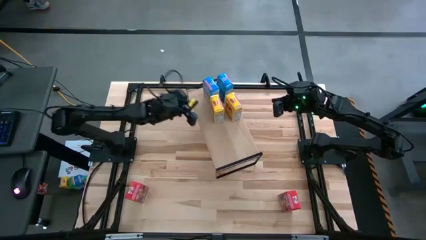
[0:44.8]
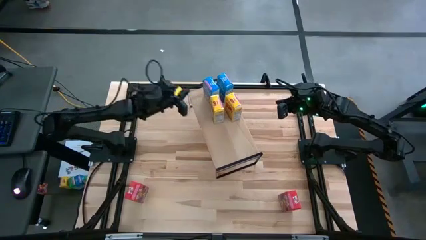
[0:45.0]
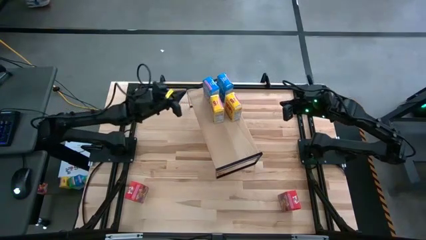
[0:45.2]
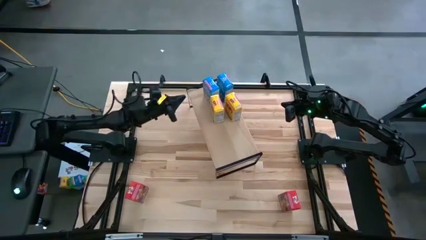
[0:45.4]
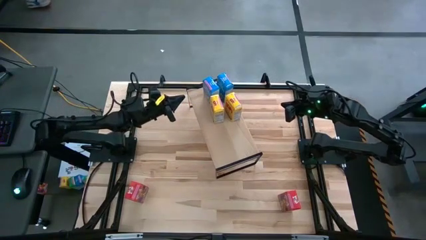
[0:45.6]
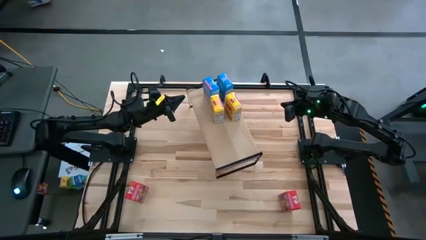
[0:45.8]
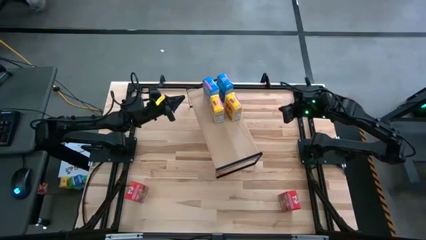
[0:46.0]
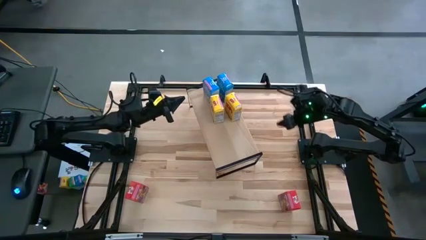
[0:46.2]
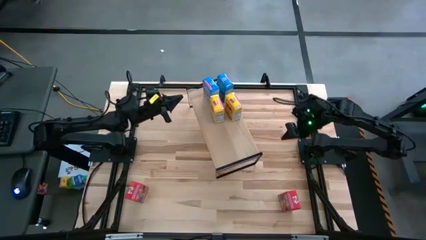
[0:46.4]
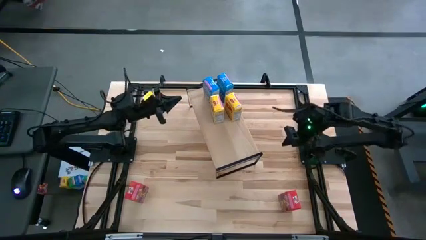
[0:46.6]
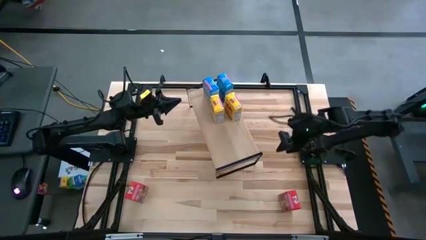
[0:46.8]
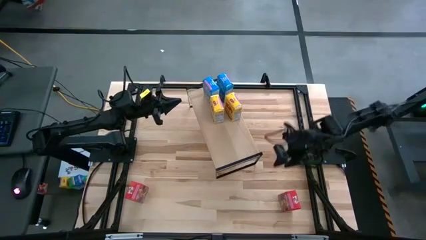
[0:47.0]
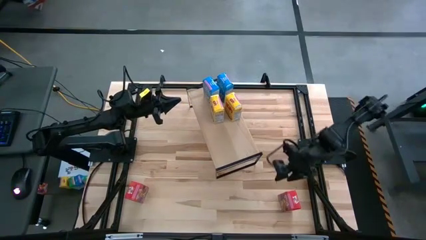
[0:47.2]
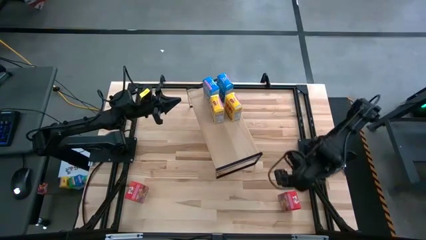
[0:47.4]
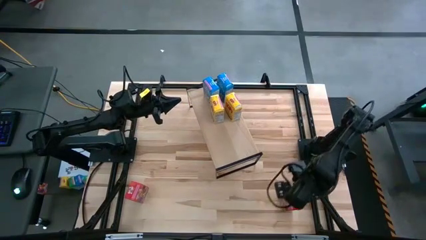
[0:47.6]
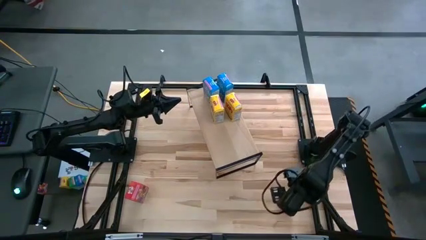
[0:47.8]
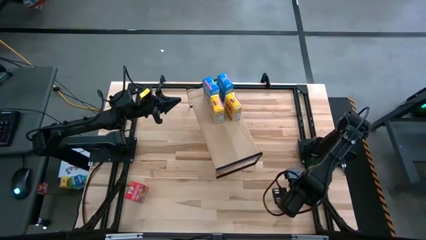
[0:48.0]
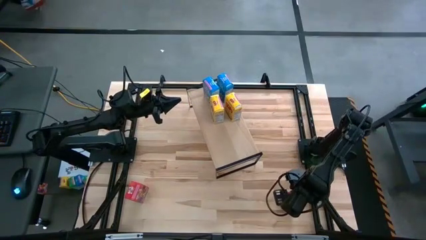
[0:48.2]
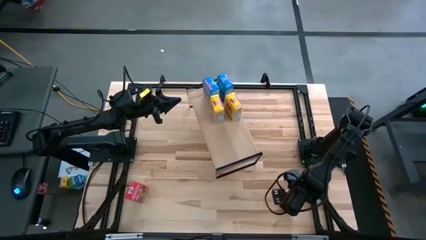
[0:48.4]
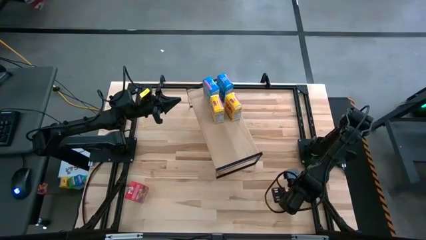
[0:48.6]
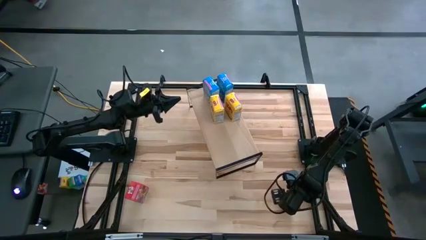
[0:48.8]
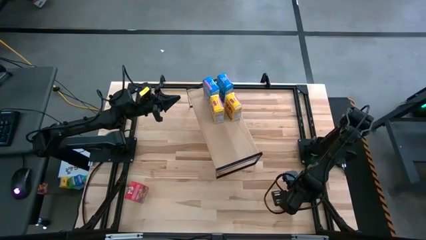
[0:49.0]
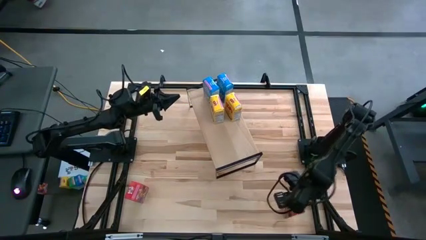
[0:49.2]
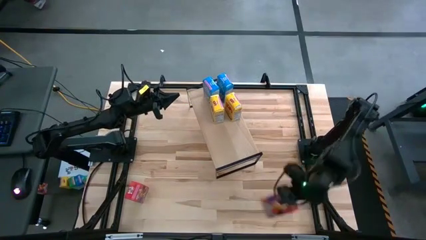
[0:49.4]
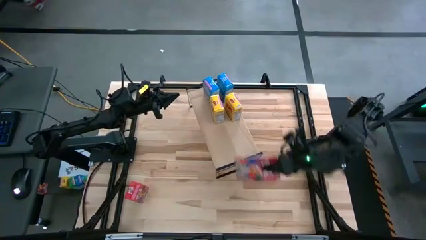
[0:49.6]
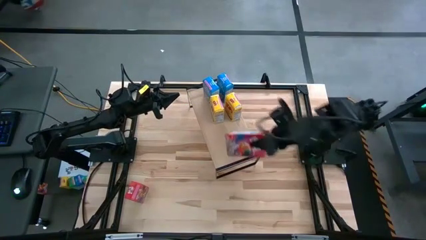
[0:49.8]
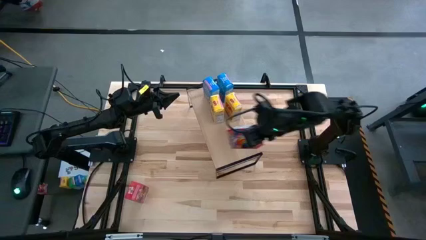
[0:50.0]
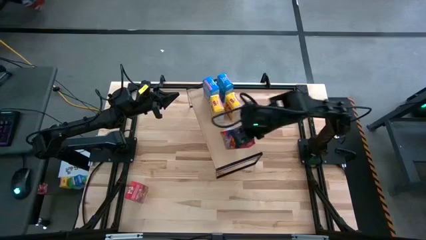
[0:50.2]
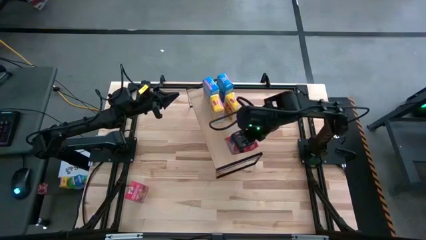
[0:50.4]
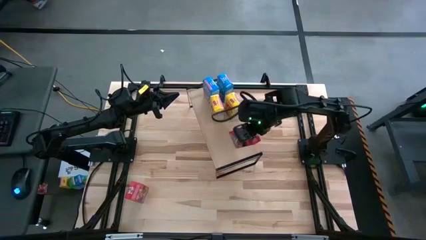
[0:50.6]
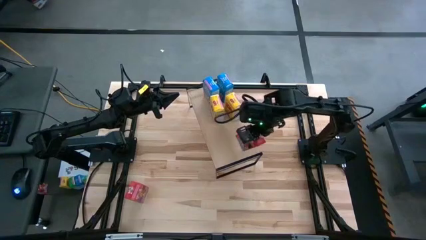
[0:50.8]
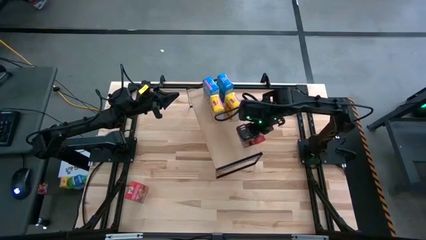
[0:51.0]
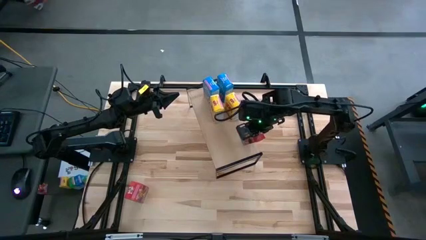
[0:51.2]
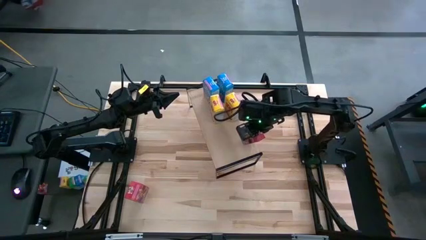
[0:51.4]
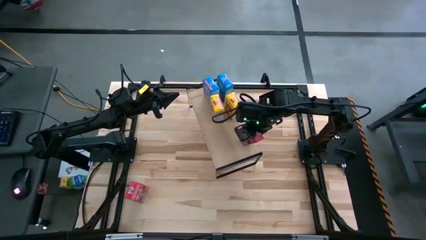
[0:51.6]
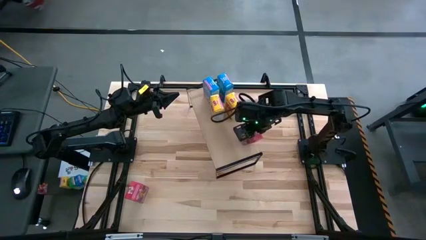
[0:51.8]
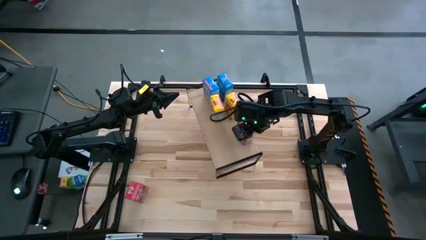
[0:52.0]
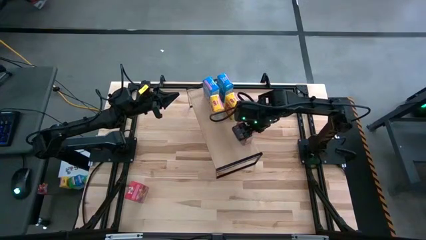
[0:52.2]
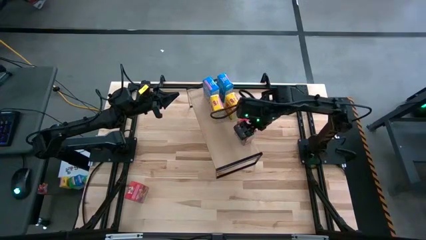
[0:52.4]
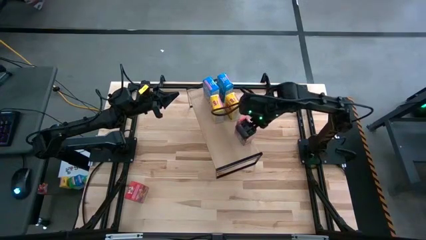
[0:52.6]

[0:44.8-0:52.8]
Task: Stack cereal on shelf
Put the right red cereal box on the shelf

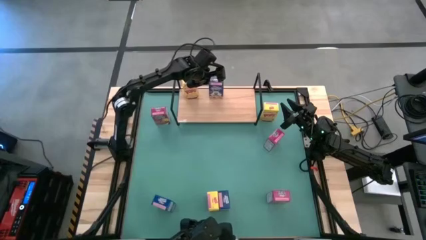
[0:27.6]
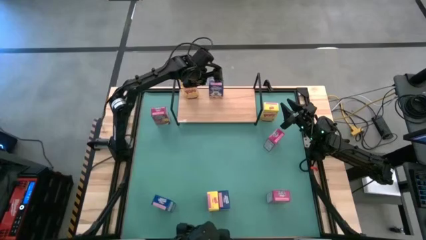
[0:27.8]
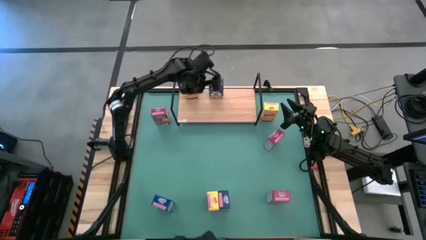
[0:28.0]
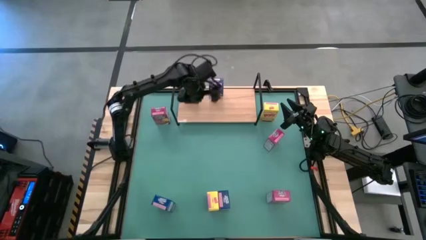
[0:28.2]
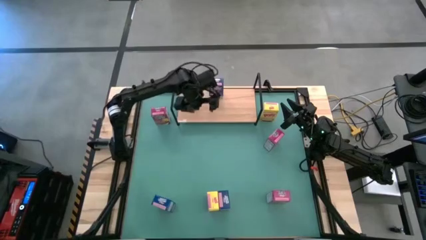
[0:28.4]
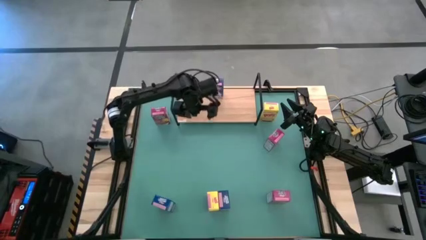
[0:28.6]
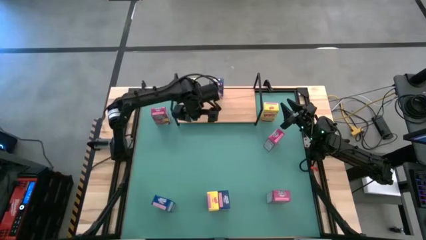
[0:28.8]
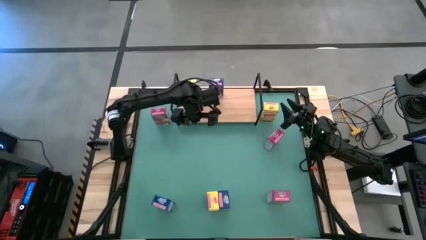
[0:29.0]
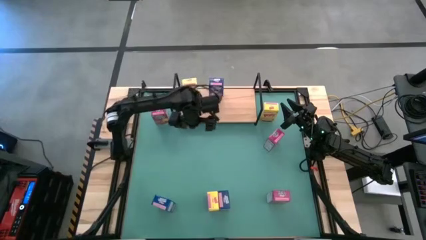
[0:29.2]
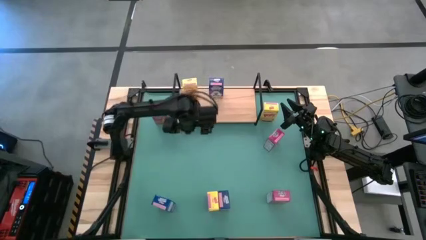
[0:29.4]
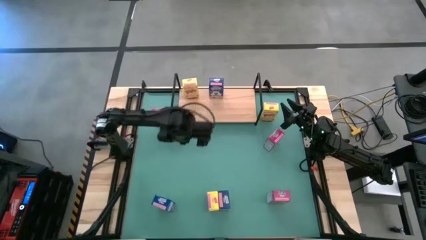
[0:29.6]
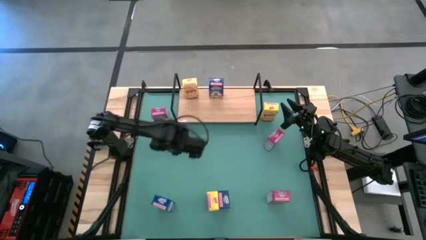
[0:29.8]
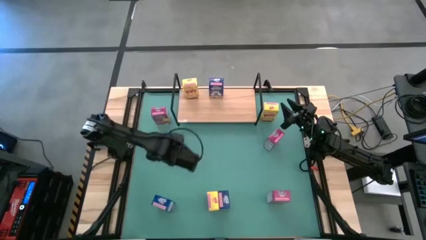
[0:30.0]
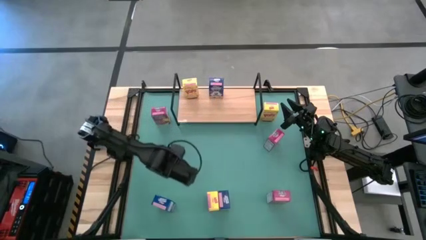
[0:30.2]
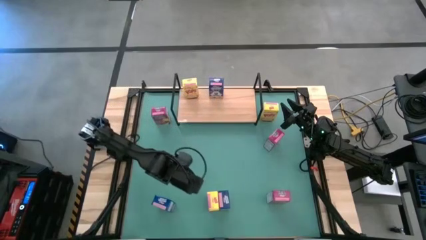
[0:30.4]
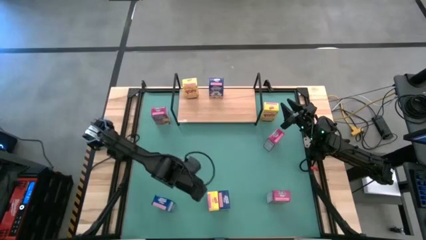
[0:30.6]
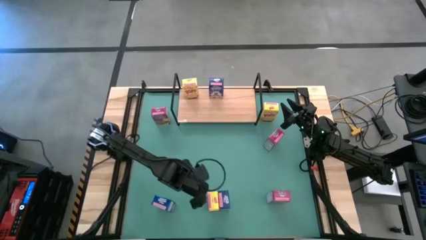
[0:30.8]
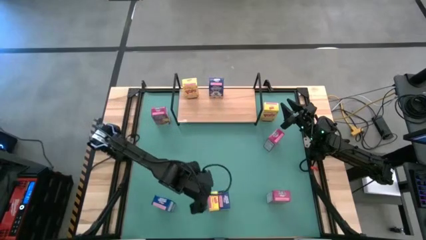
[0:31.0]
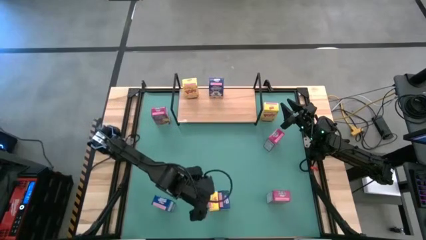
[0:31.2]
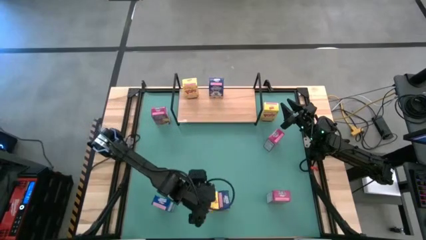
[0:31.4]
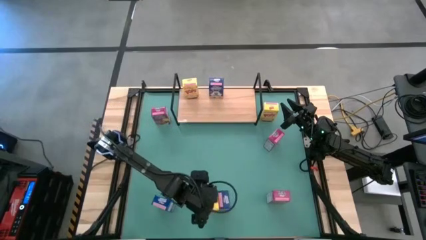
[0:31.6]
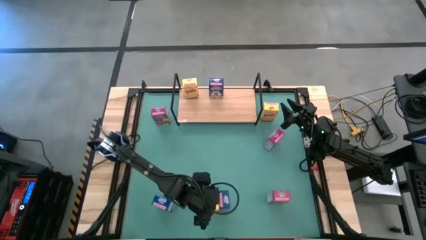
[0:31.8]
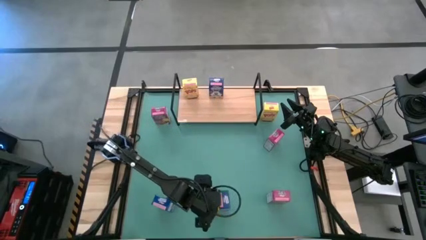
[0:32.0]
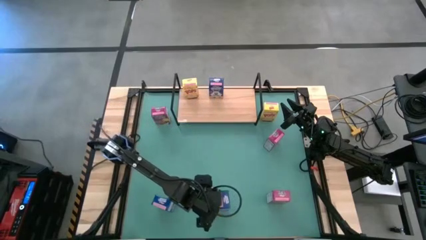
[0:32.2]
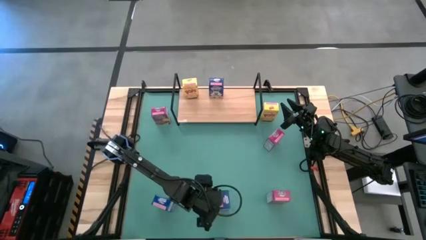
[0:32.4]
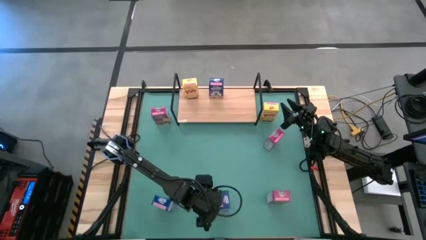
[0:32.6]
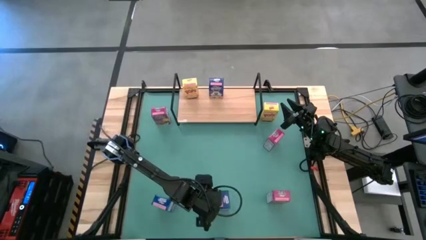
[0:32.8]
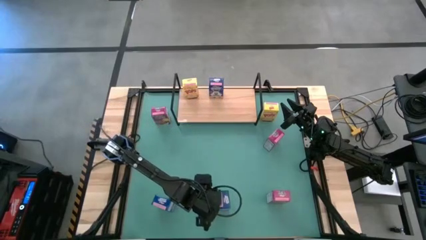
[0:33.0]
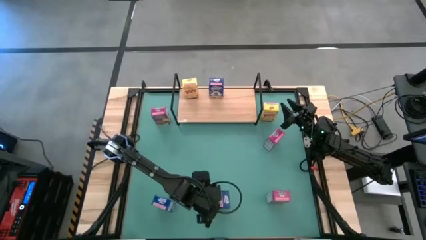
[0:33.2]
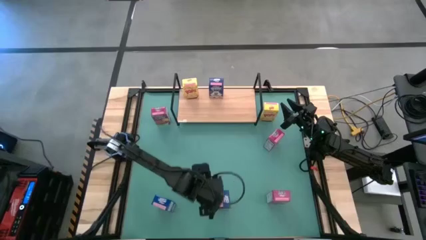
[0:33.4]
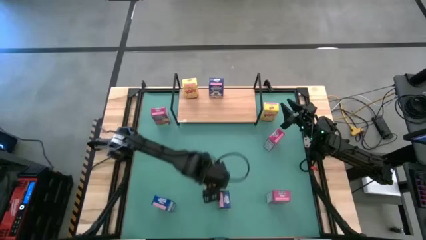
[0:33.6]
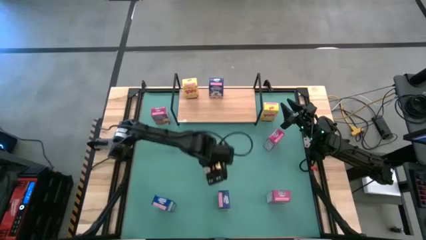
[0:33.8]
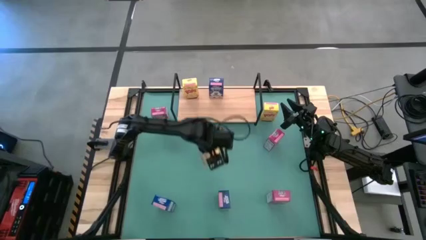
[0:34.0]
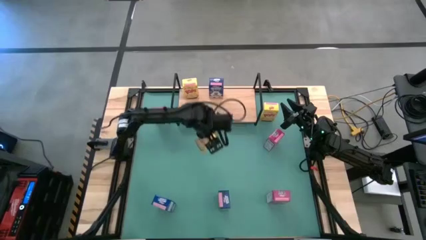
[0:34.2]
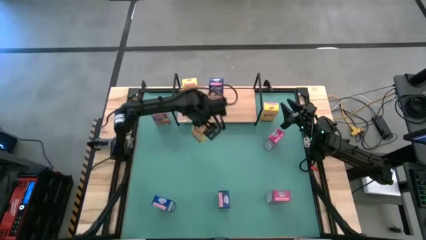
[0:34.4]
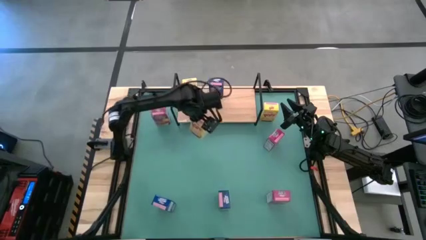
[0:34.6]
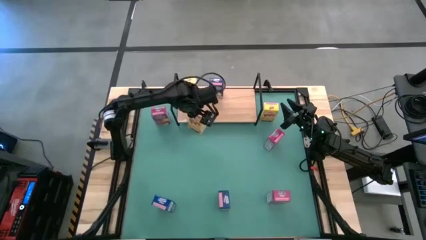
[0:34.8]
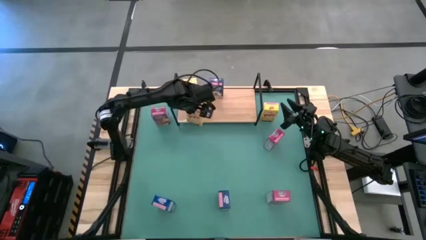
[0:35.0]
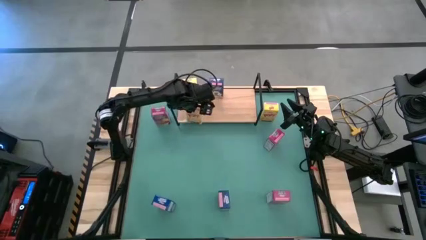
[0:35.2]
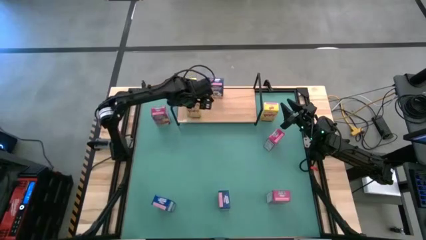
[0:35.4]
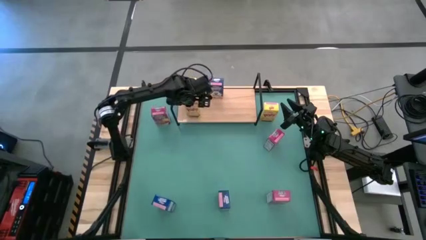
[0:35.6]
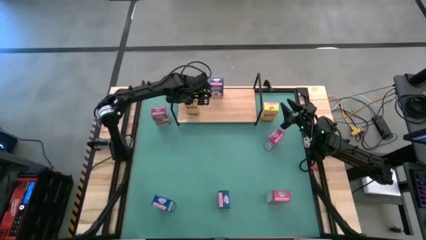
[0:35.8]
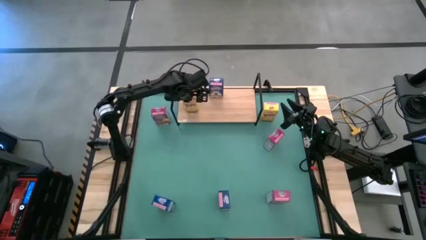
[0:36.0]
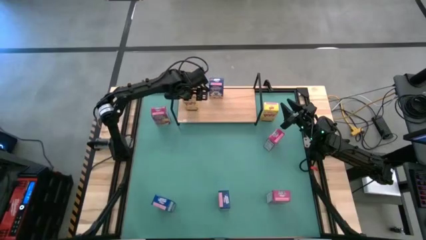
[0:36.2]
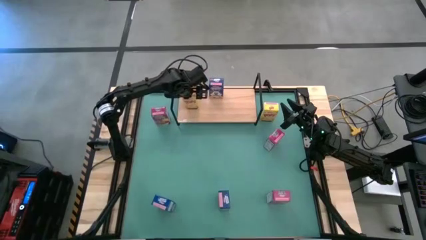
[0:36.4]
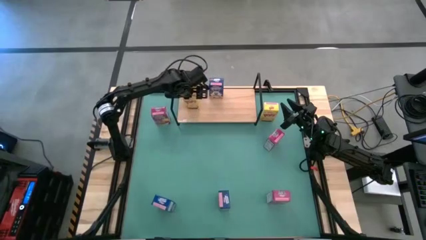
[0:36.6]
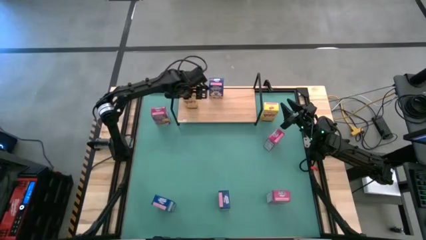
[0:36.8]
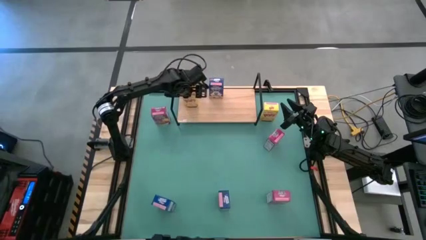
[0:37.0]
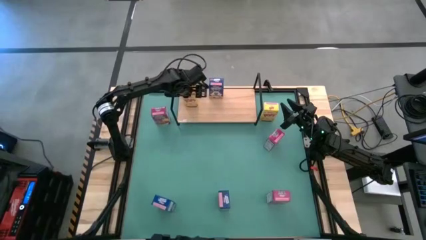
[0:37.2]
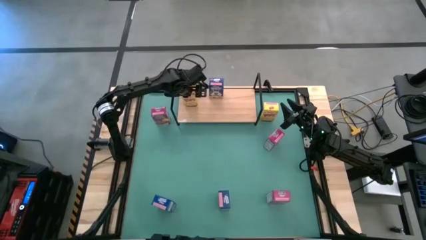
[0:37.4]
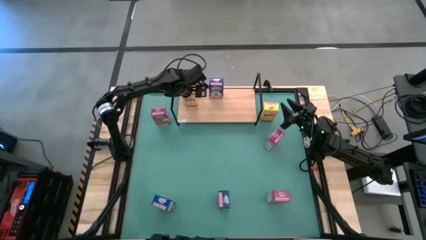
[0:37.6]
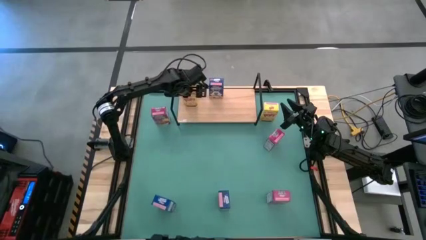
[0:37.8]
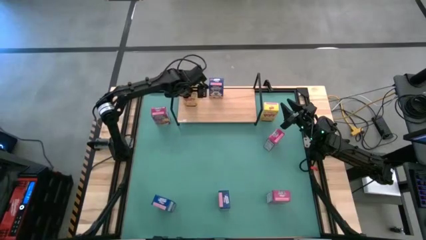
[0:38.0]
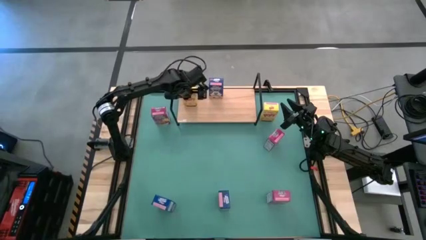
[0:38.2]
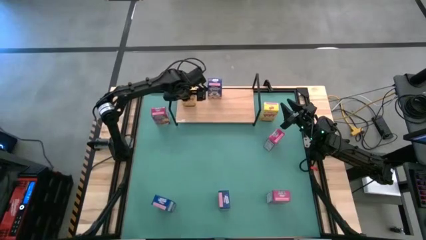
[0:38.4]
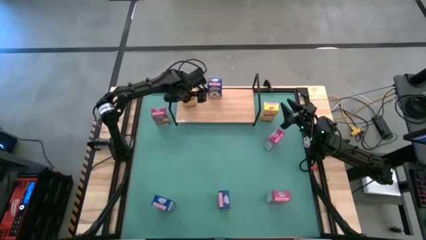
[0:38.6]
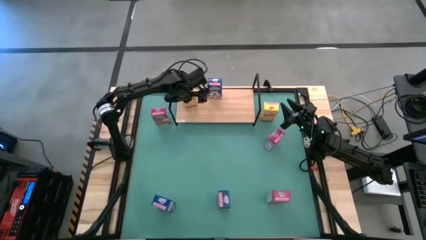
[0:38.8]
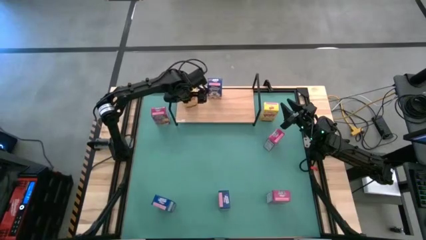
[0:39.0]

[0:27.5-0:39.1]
Task: Stack cereal on shelf
Put the bottom yellow cereal box on the shelf aligned with the other yellow cereal box
